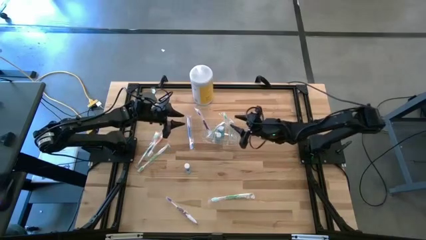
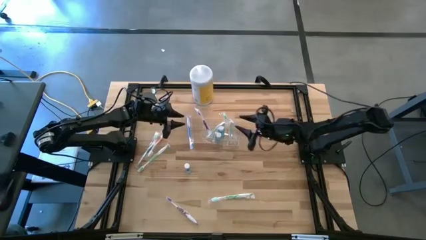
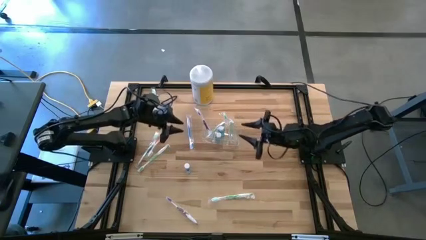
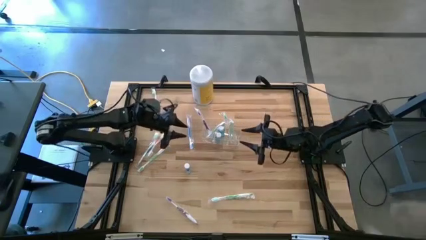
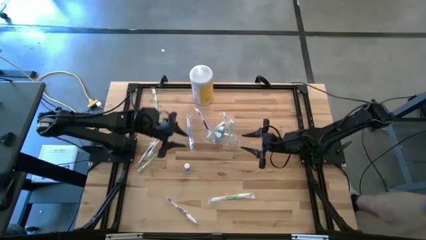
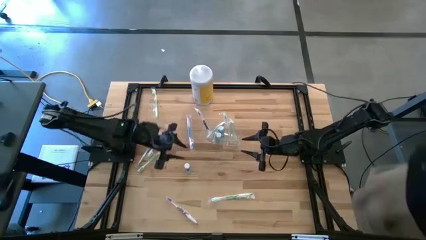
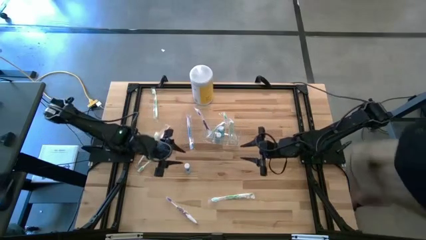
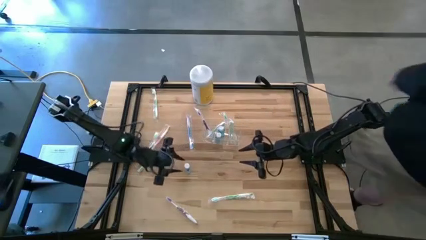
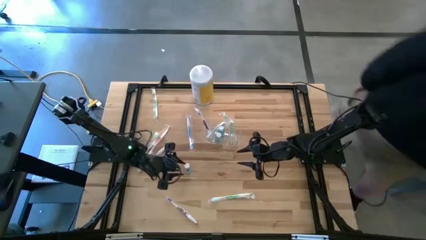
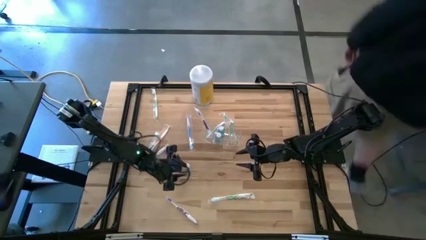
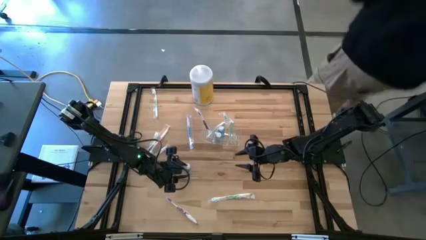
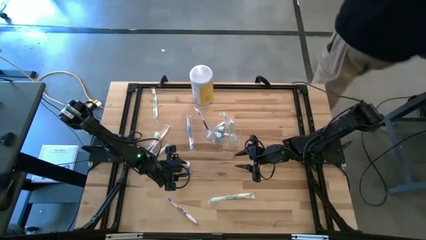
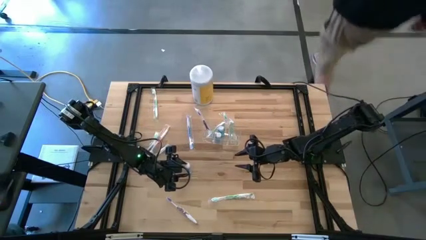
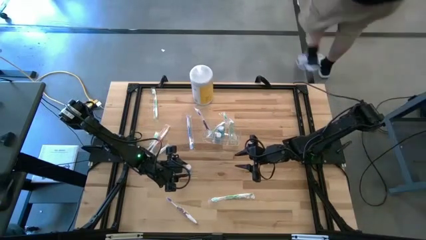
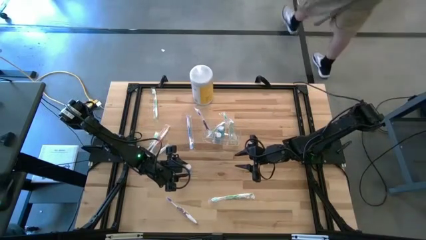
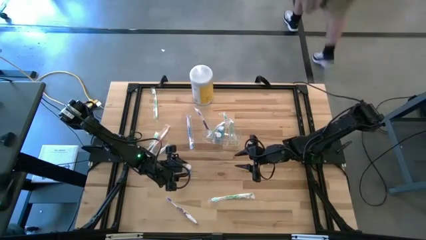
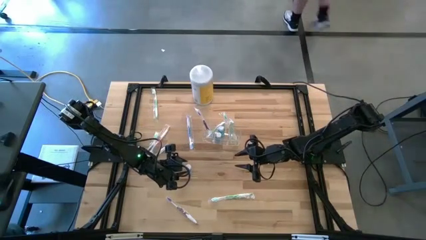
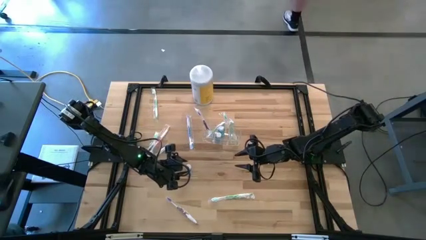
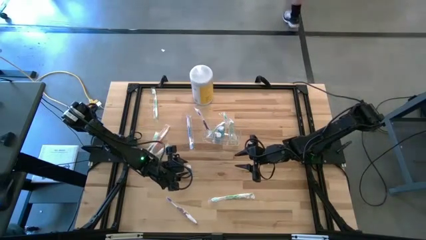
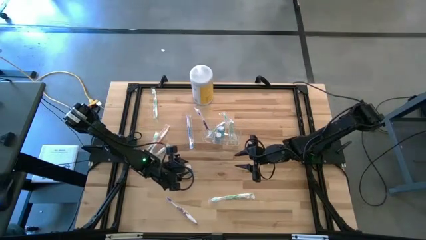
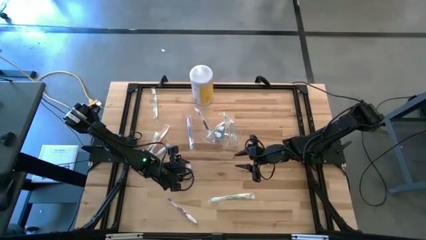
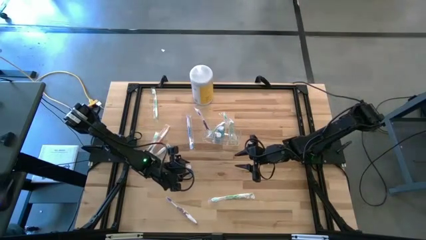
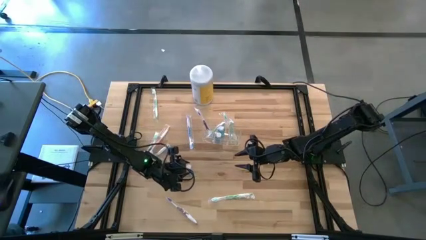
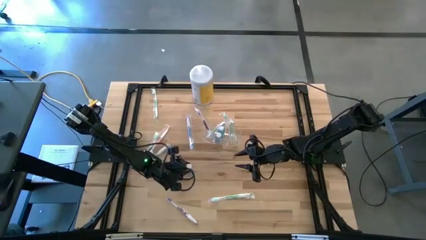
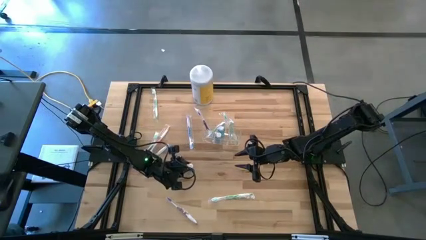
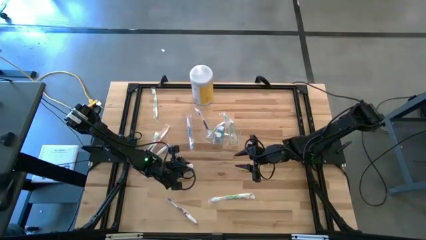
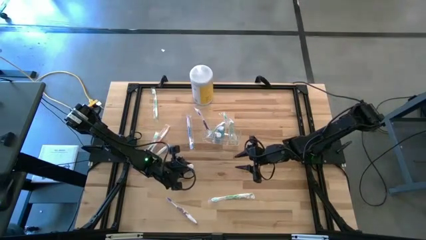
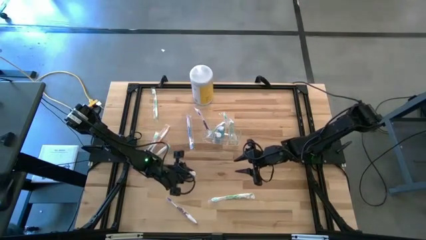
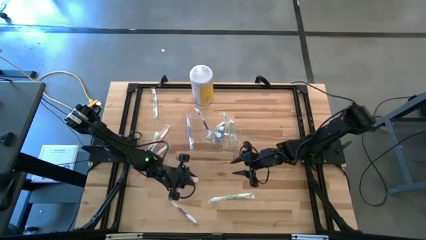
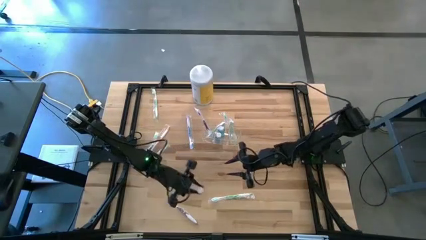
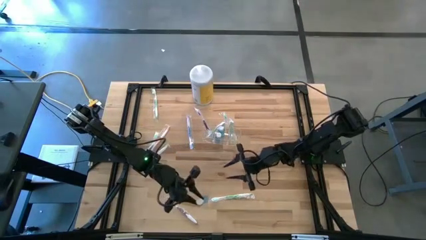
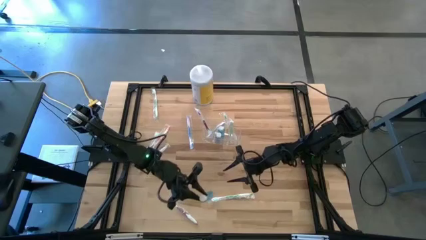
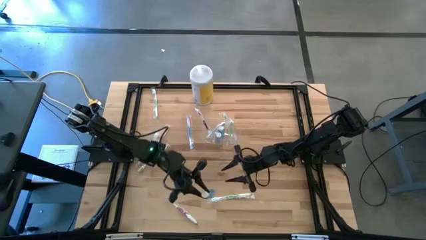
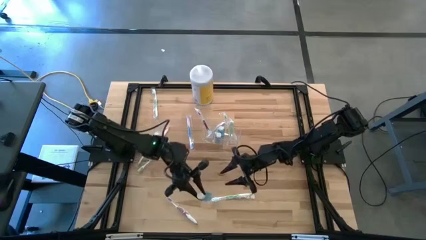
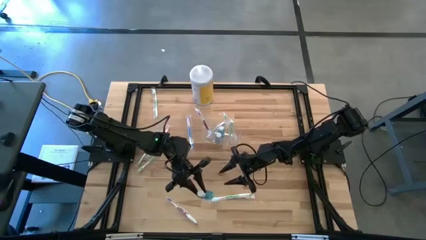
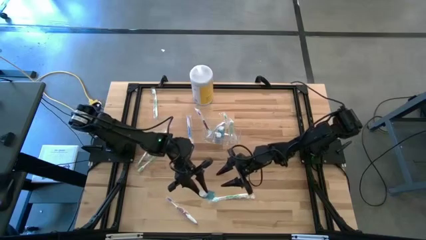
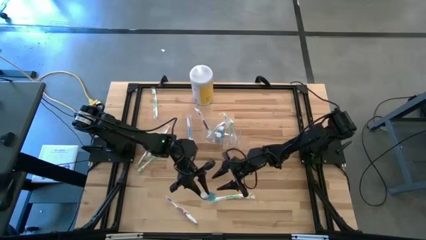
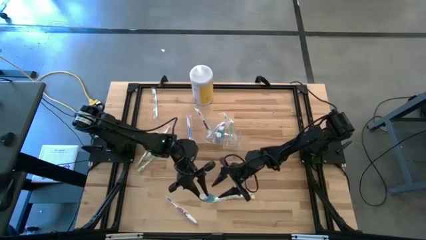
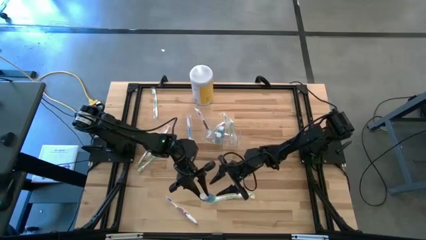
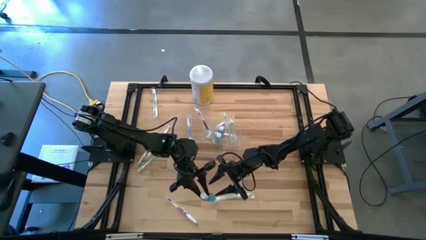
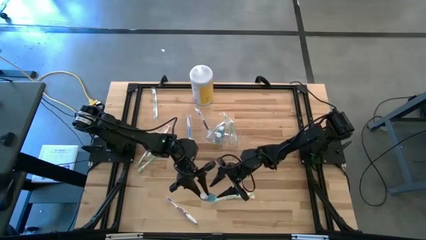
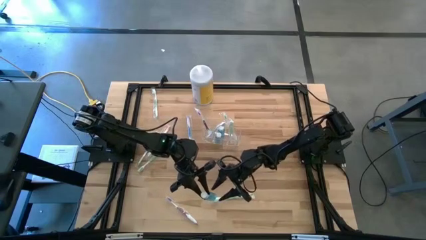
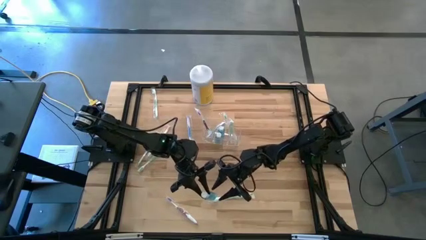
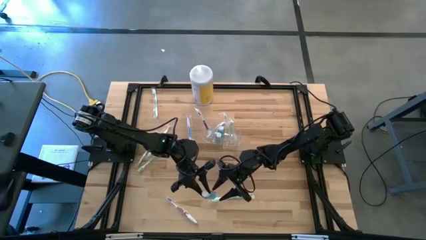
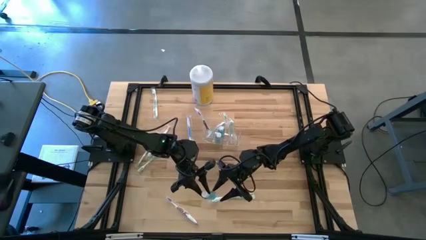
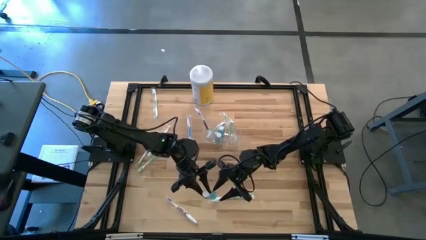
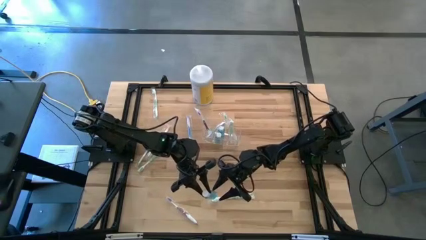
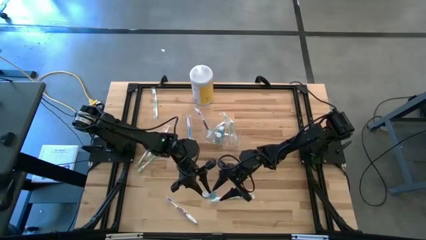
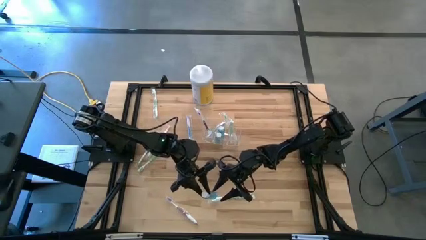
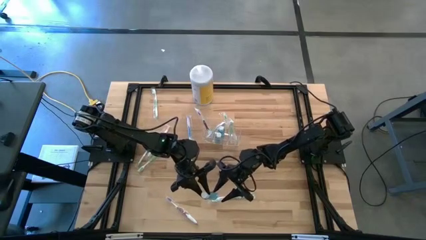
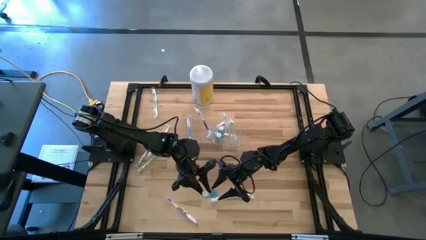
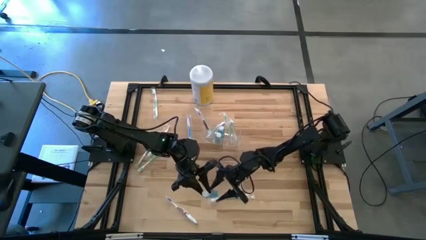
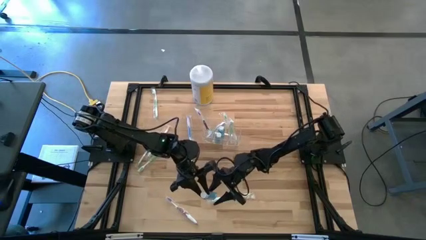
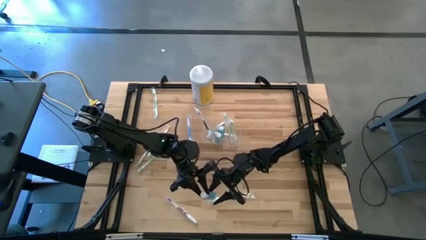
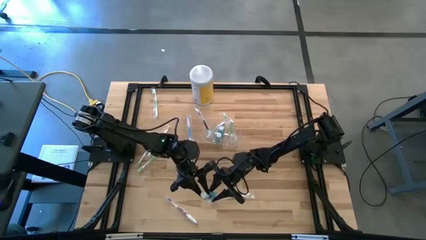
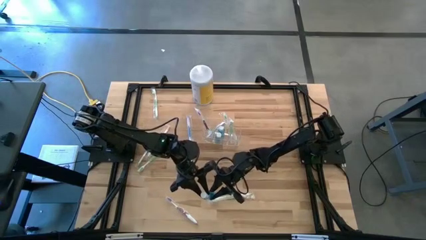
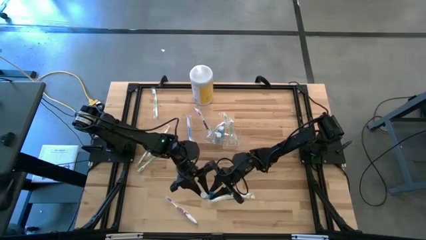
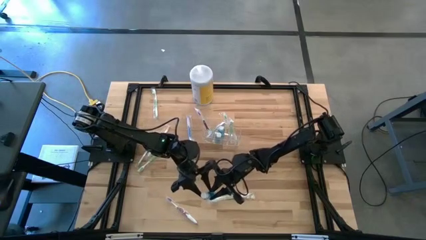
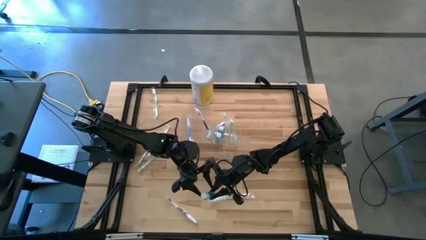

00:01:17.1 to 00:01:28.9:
Task: Pick & Place toothbrushing station
Put the mouthwash into the middle section of the transparent organizer
